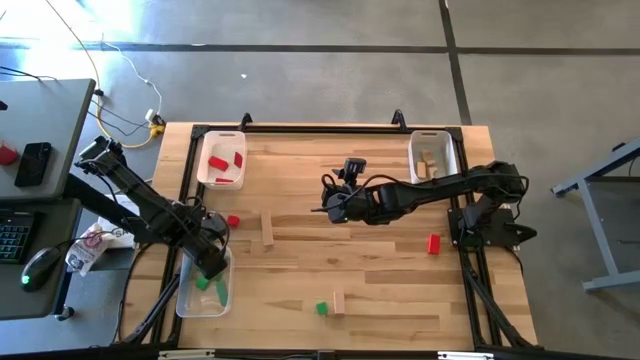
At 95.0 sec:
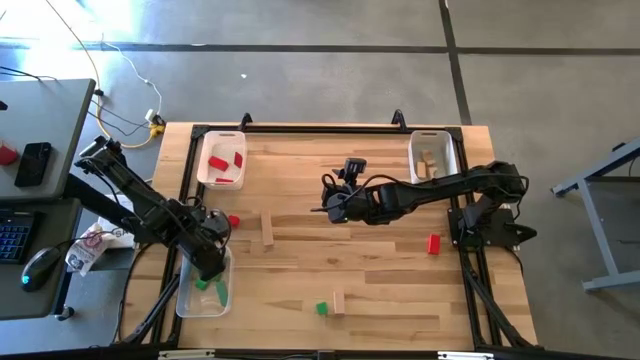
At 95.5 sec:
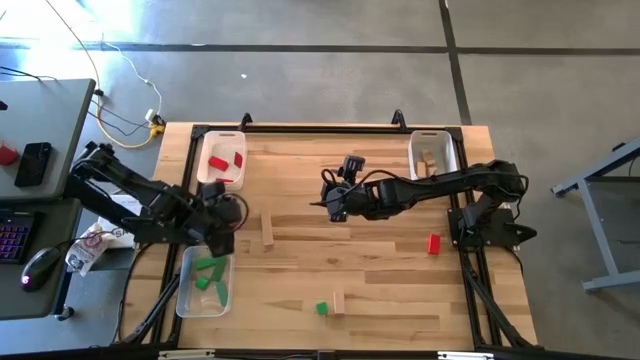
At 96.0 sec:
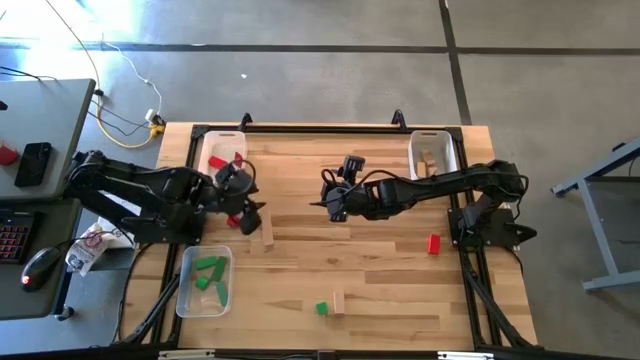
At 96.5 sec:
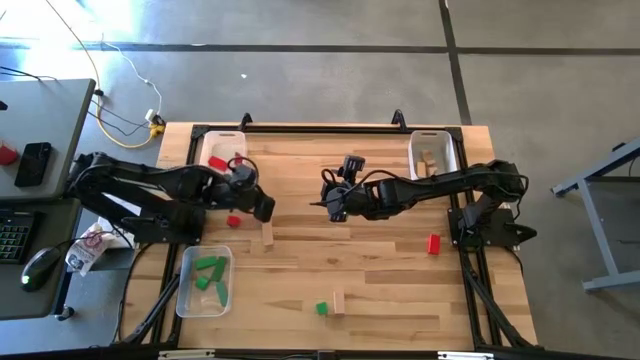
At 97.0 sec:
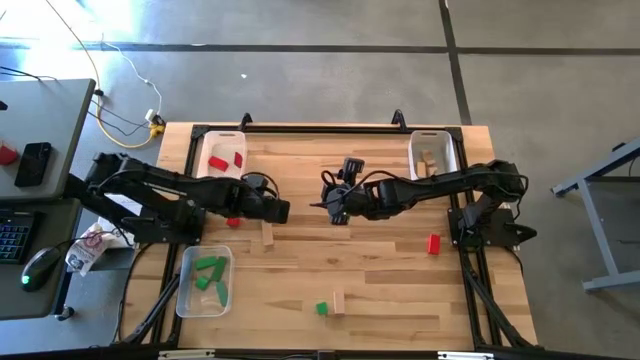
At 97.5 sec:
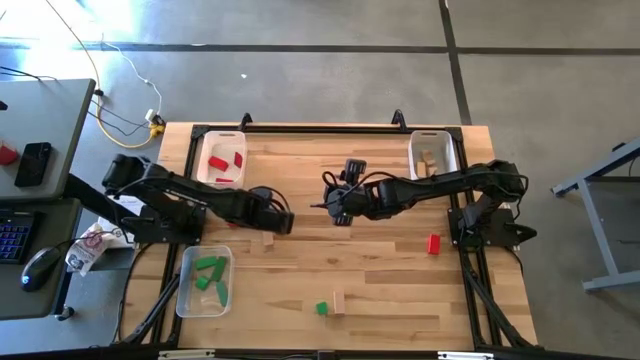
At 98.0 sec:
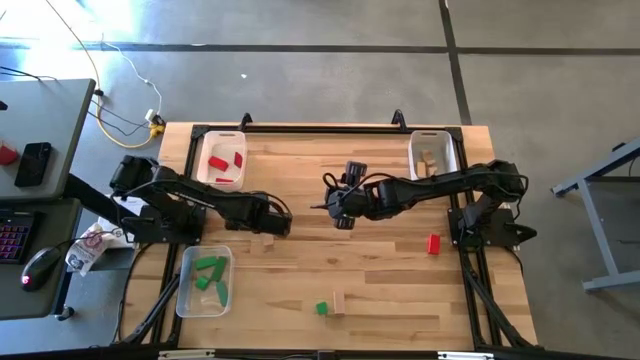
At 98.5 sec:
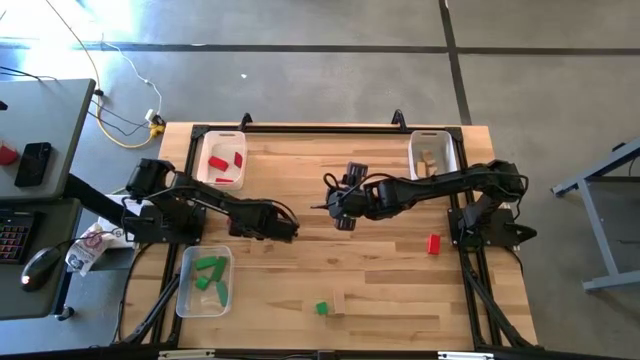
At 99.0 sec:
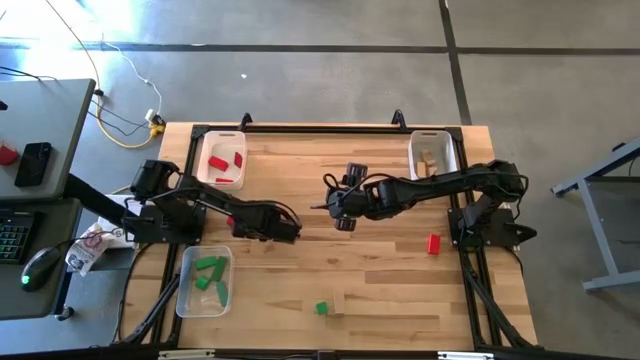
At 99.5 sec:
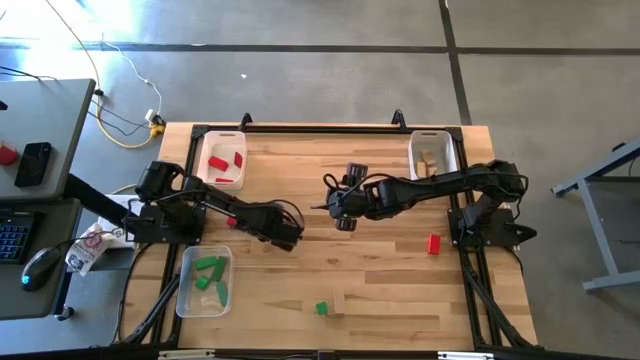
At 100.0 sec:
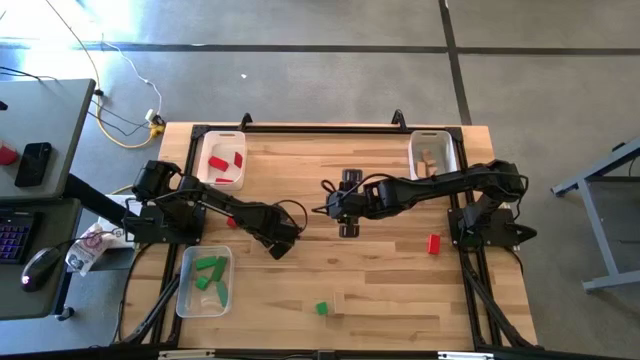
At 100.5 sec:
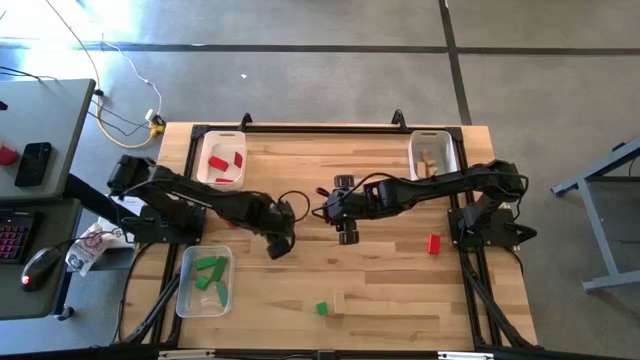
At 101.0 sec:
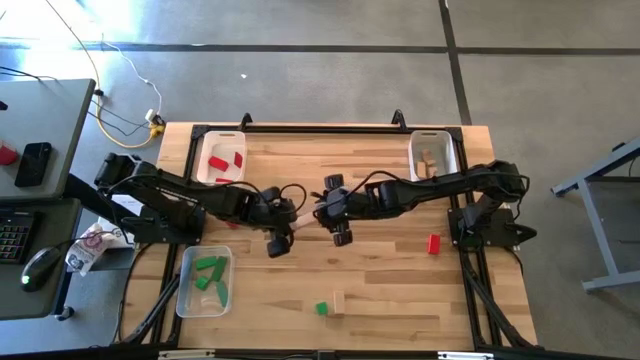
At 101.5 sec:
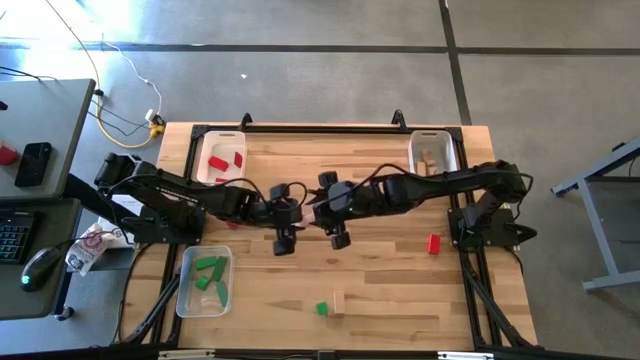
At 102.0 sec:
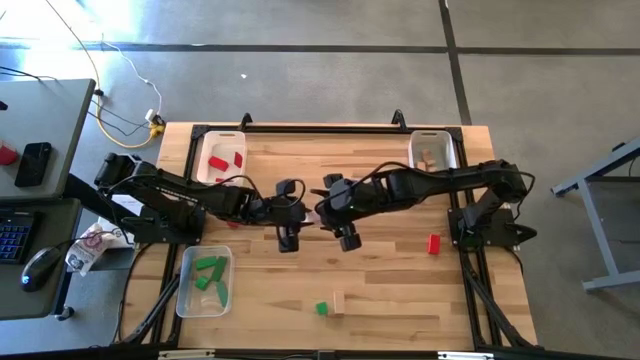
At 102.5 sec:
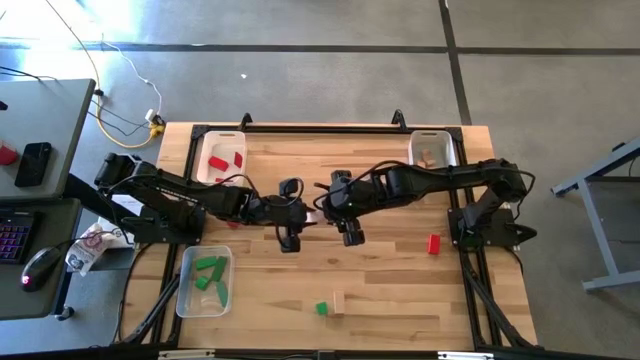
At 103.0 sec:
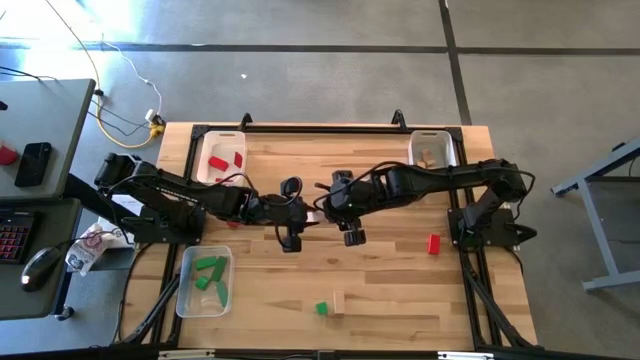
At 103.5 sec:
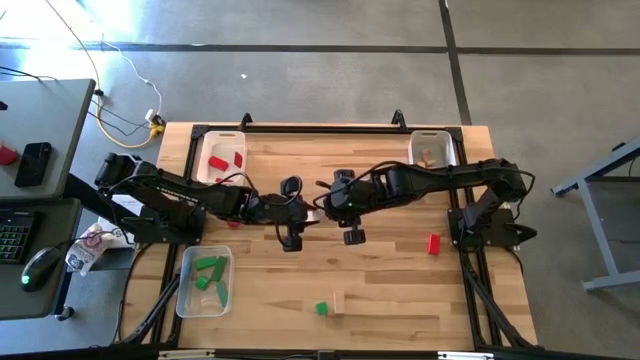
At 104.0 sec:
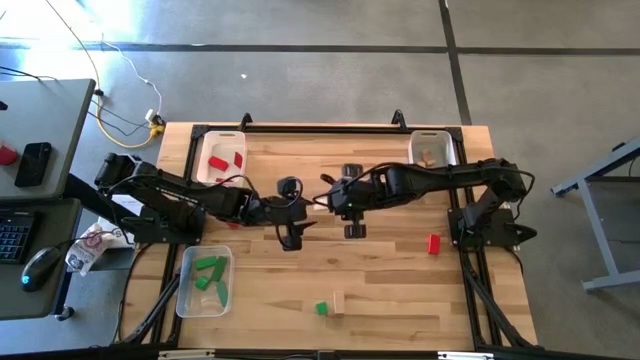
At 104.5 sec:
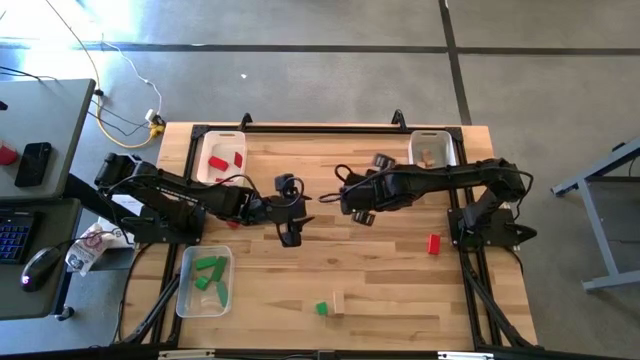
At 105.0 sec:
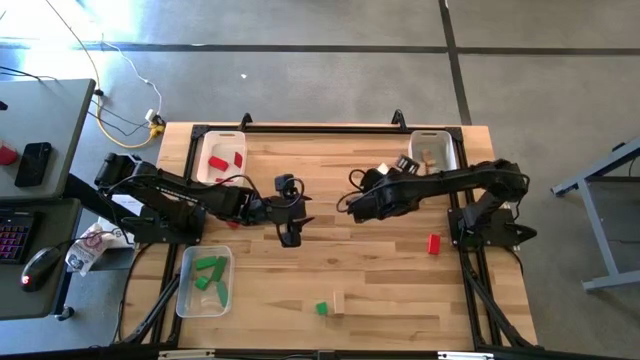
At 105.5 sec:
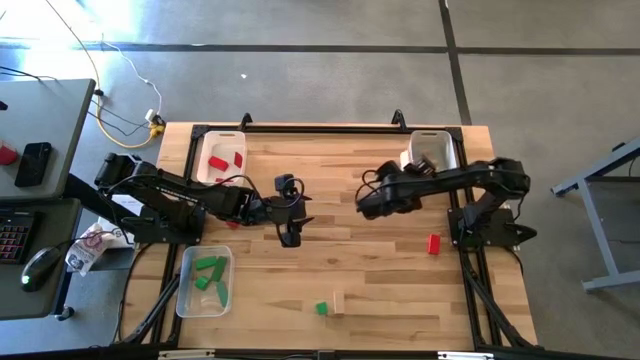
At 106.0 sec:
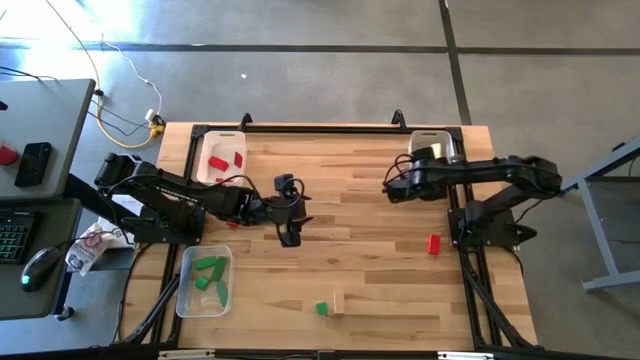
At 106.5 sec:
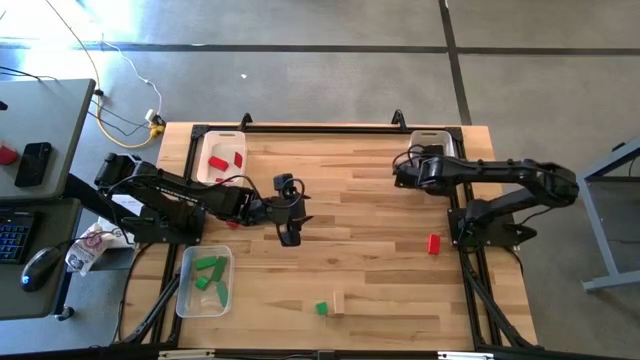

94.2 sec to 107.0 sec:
Task: Sort & place blocks by color
Put the light brown block into the gray bin

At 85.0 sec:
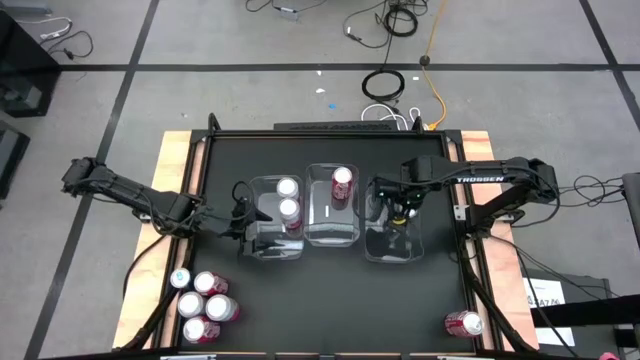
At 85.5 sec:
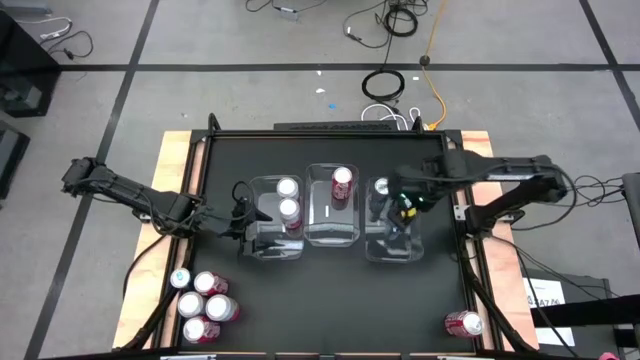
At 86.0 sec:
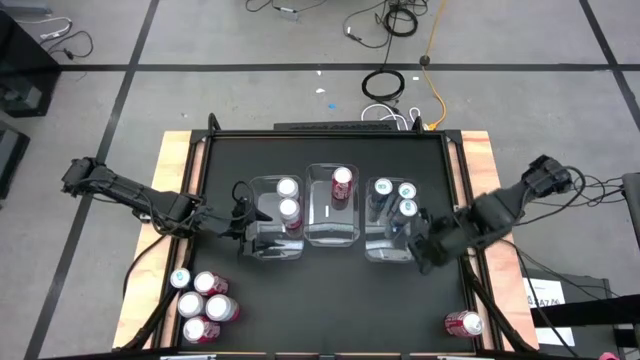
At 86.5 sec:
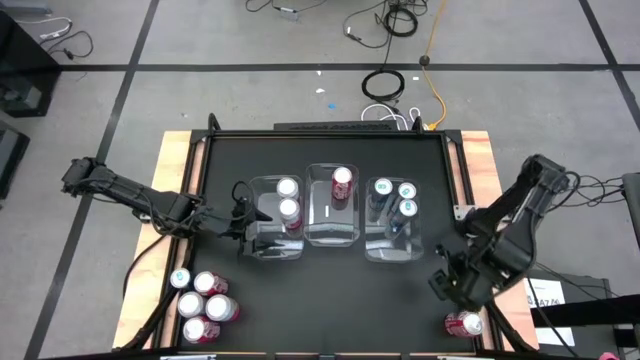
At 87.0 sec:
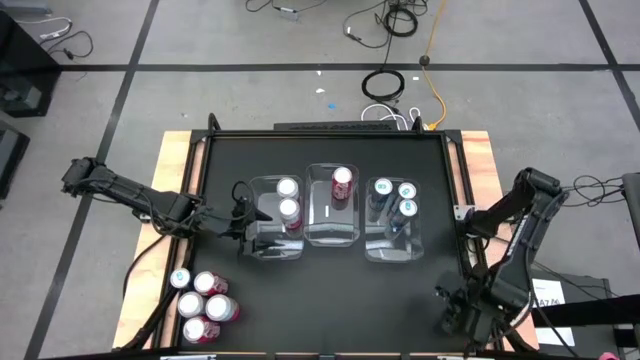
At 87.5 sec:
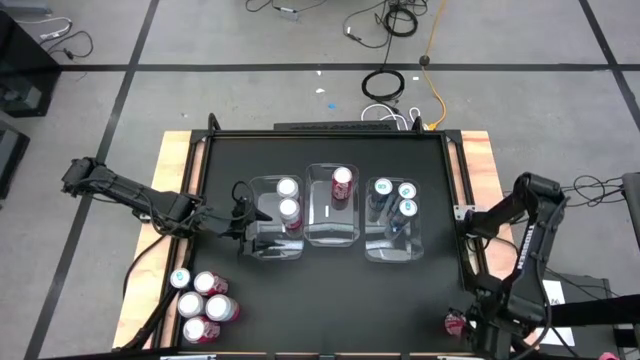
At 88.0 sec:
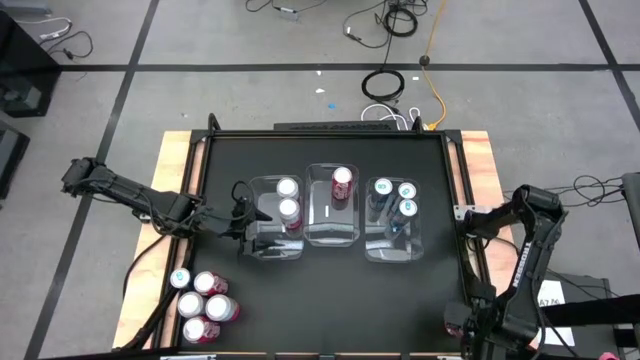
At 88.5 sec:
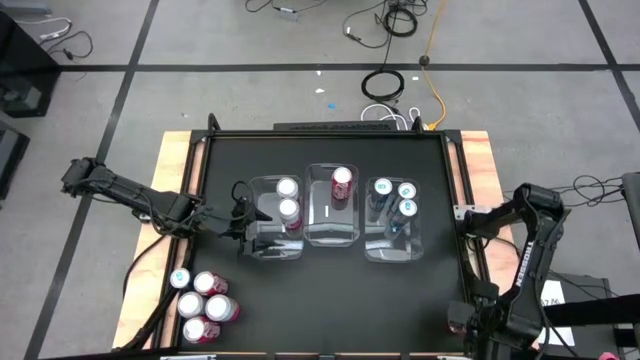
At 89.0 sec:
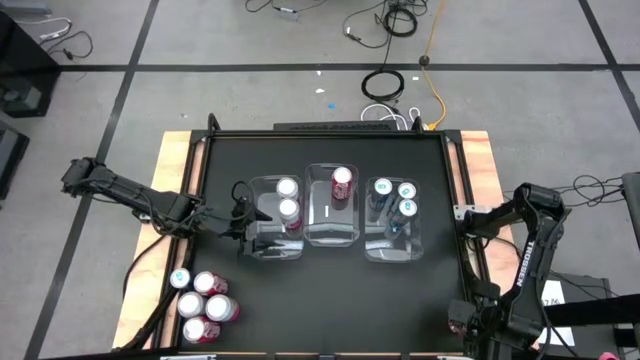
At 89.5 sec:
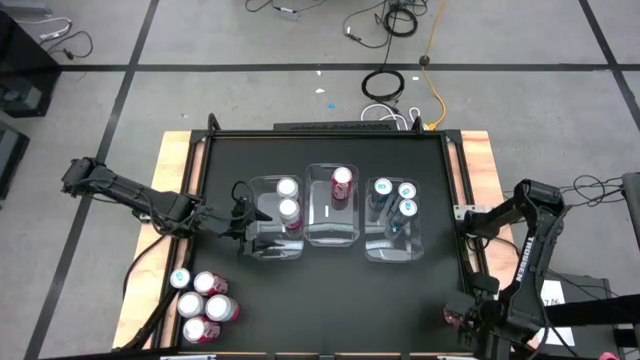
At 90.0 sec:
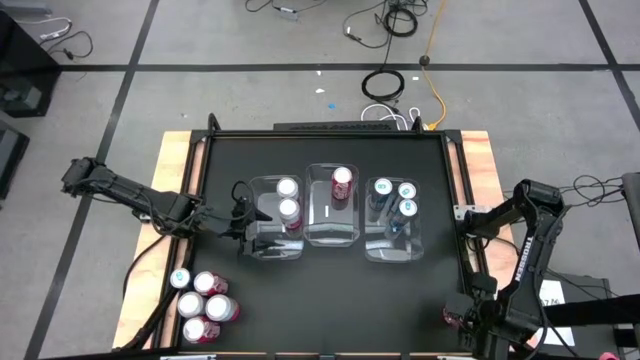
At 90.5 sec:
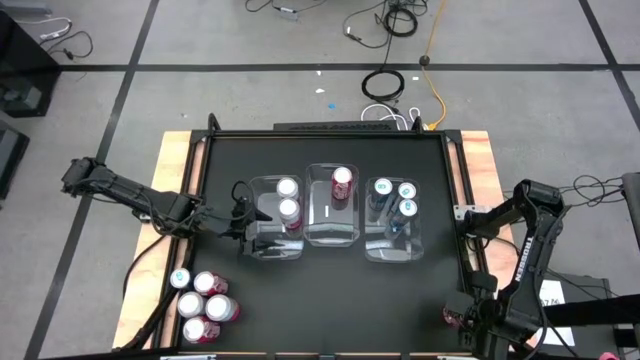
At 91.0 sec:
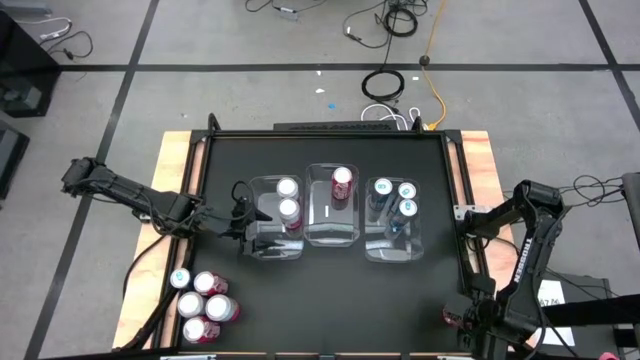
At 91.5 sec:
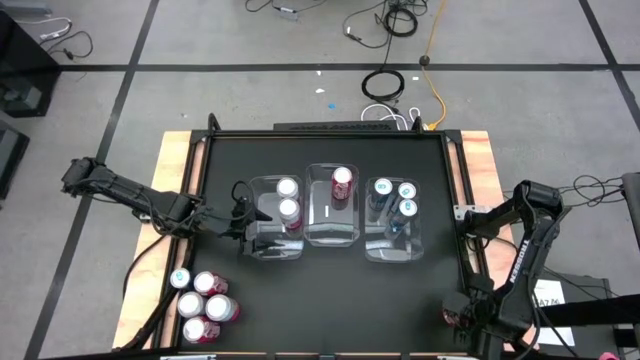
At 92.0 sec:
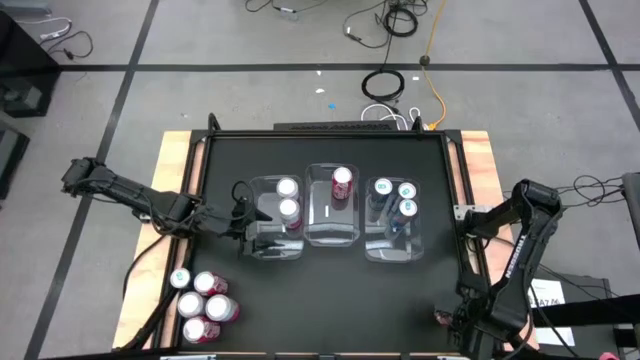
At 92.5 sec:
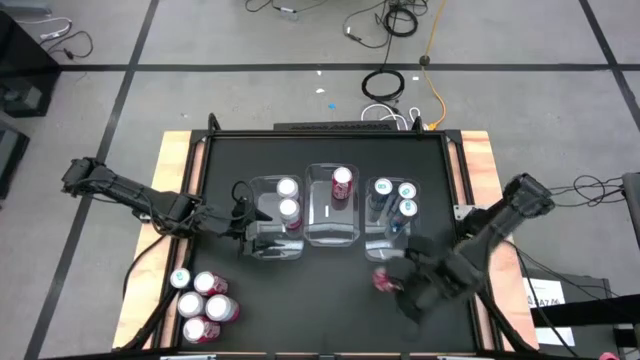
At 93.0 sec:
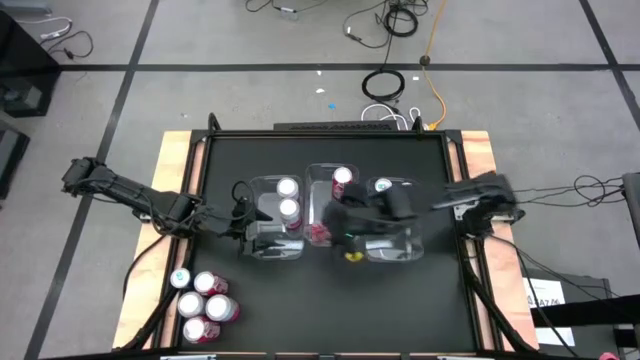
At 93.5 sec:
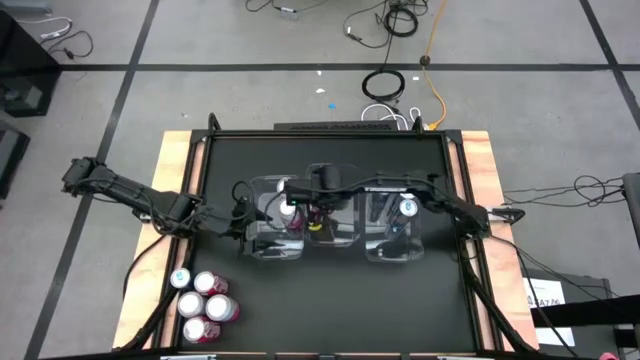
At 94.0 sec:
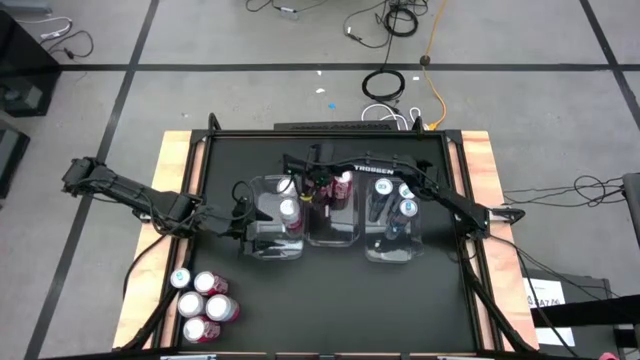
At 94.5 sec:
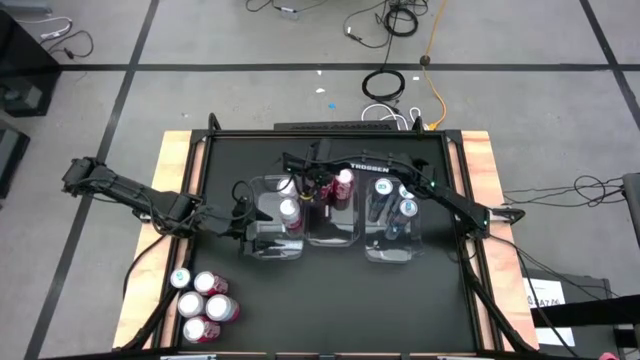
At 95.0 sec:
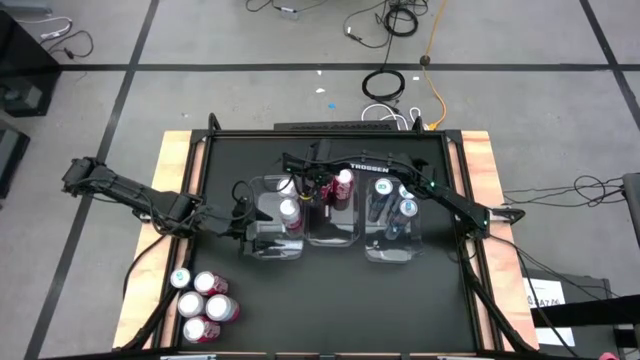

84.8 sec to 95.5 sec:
Task: Sort soda cans
Put the bottom right red soda can into the center transparent bin
